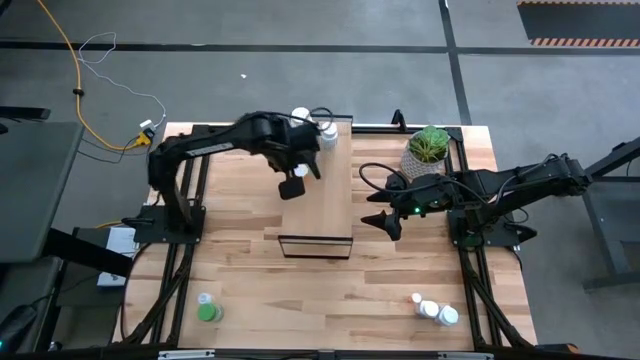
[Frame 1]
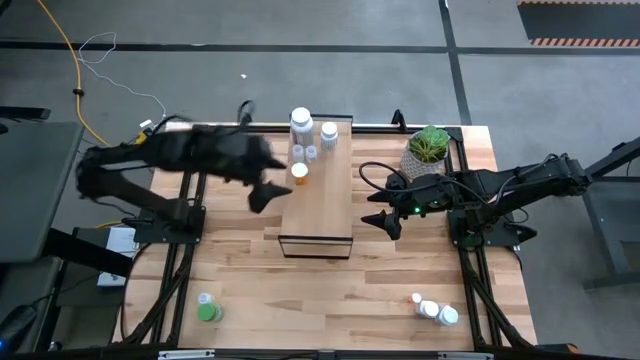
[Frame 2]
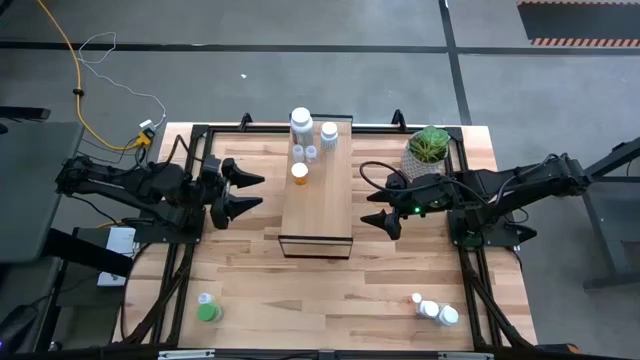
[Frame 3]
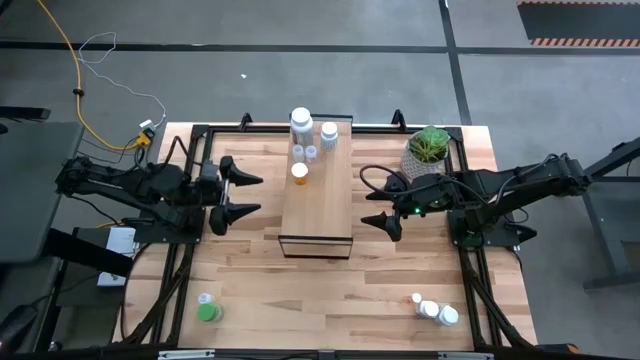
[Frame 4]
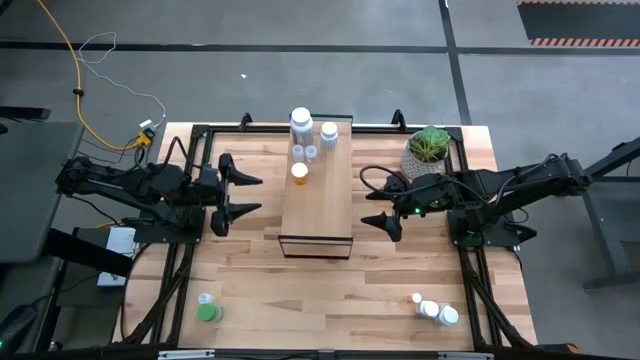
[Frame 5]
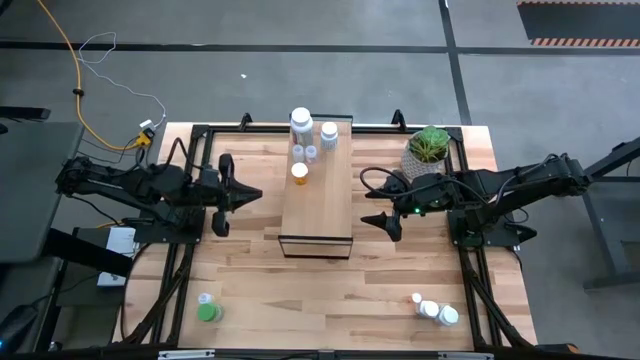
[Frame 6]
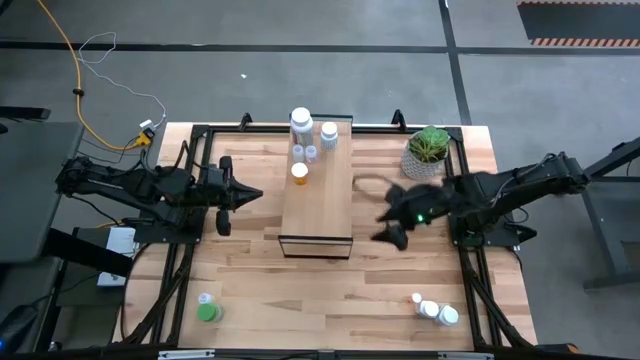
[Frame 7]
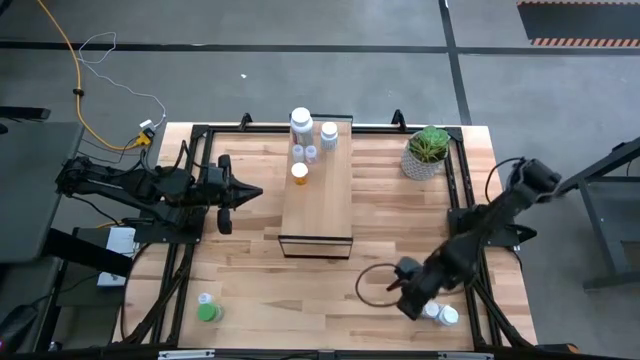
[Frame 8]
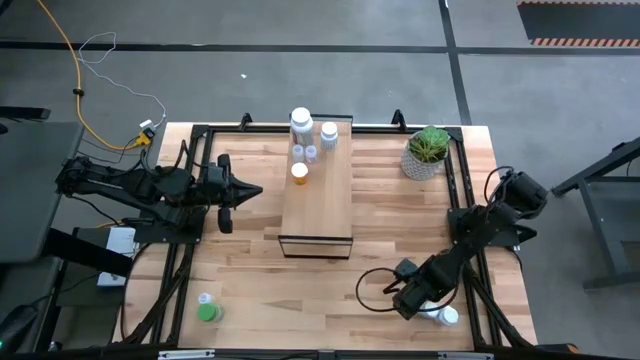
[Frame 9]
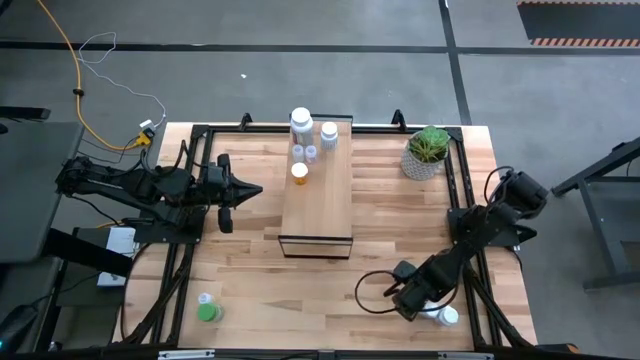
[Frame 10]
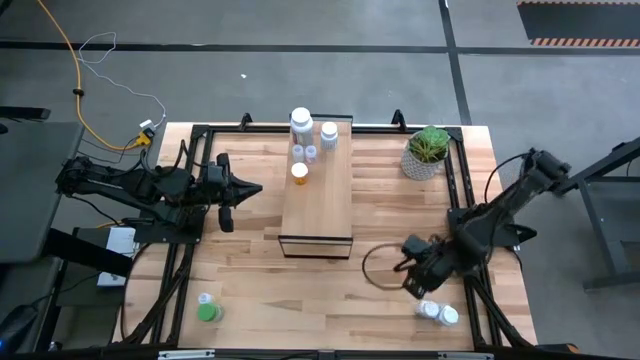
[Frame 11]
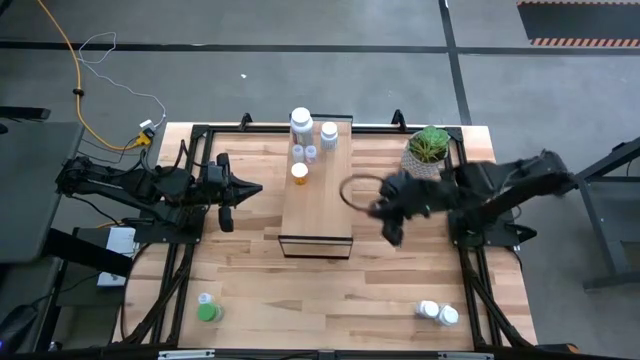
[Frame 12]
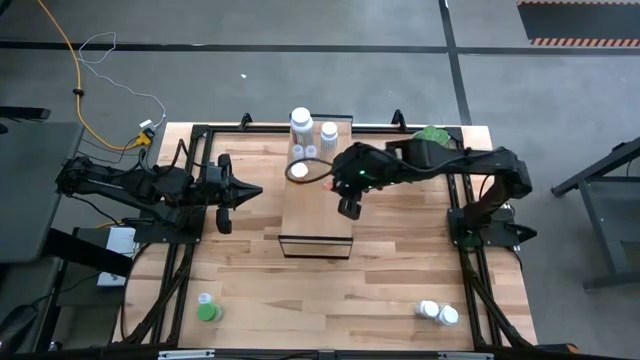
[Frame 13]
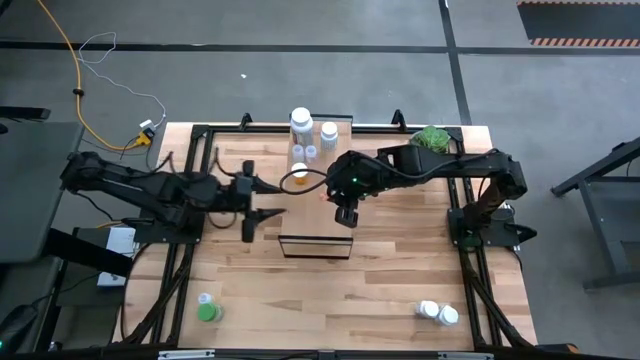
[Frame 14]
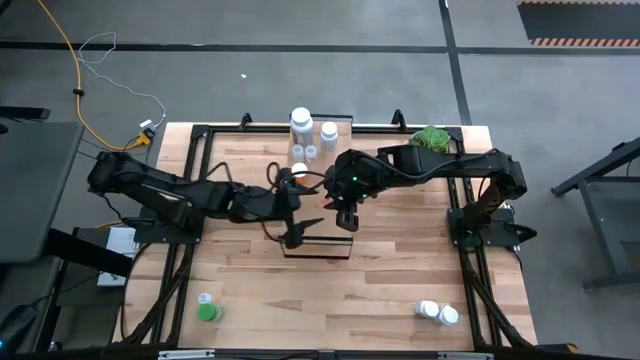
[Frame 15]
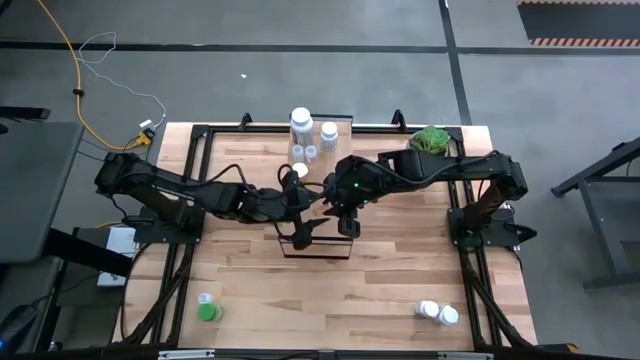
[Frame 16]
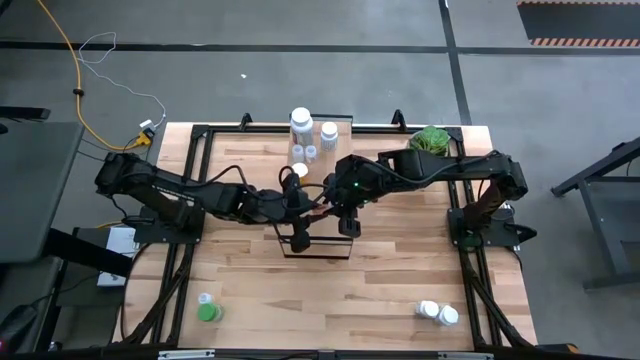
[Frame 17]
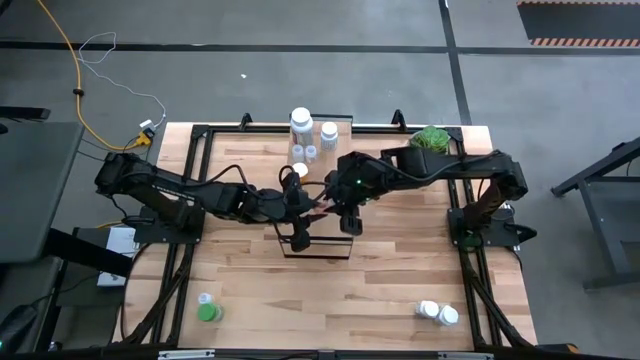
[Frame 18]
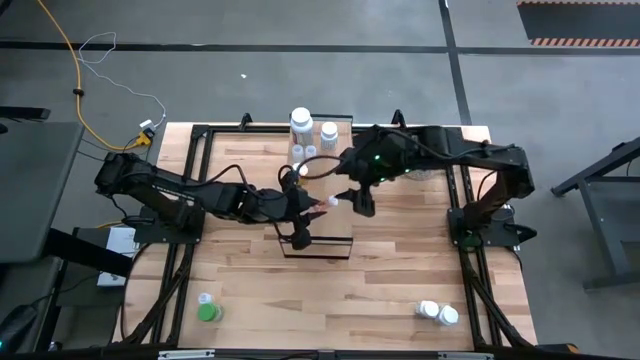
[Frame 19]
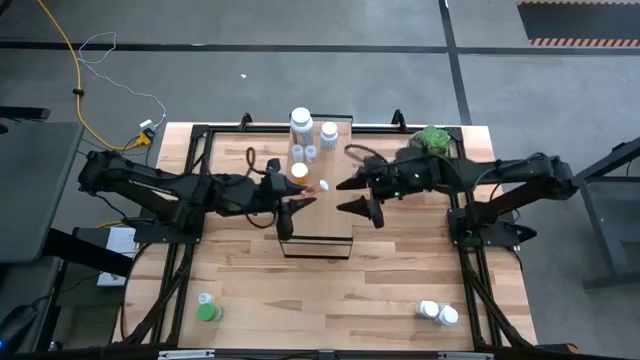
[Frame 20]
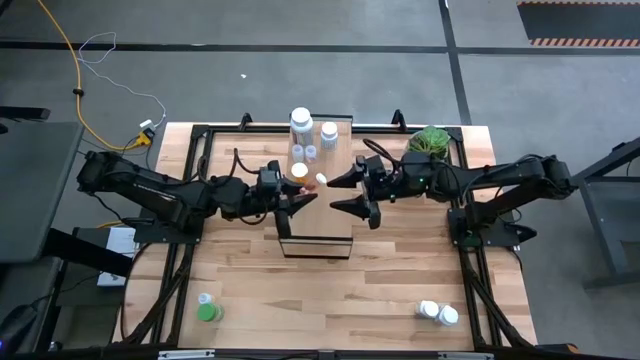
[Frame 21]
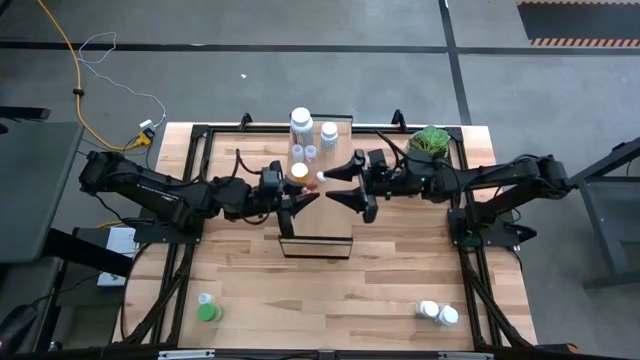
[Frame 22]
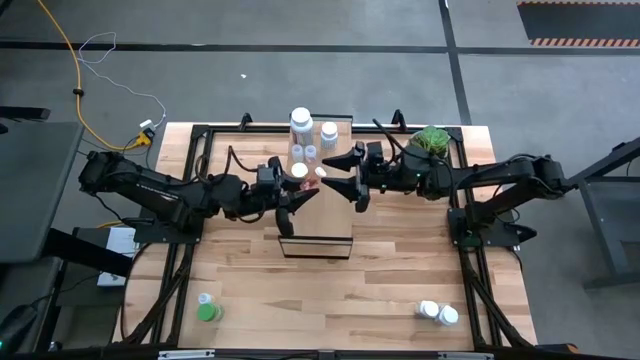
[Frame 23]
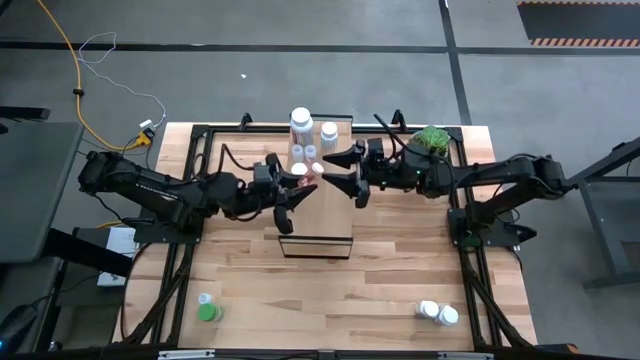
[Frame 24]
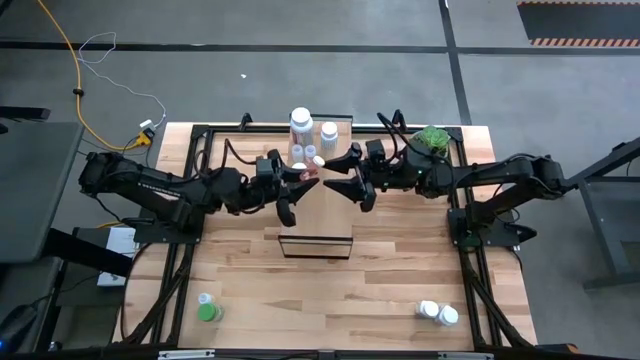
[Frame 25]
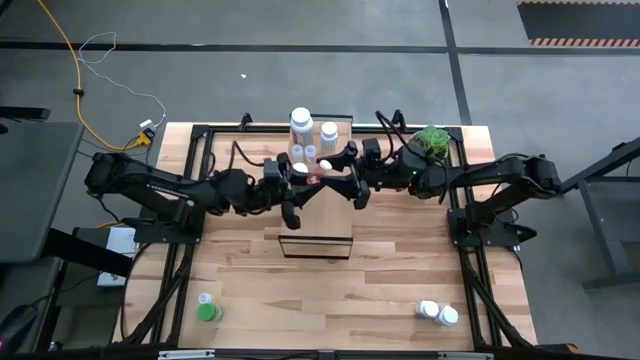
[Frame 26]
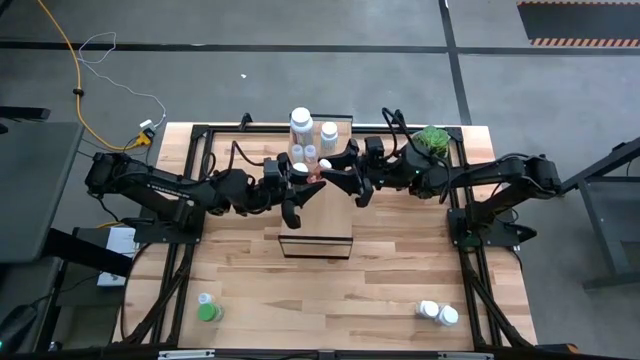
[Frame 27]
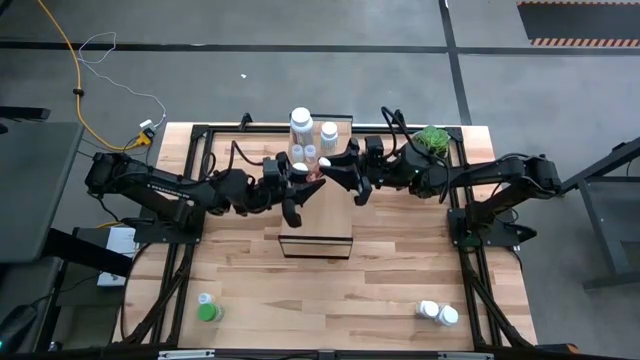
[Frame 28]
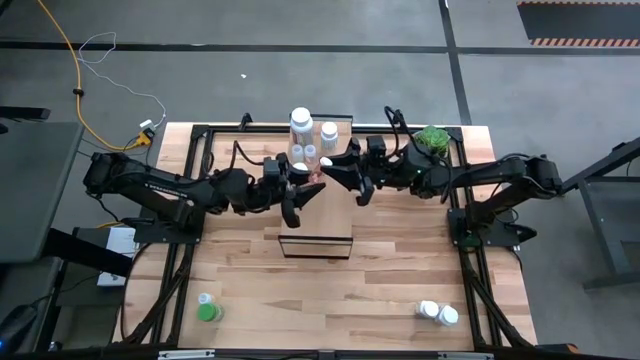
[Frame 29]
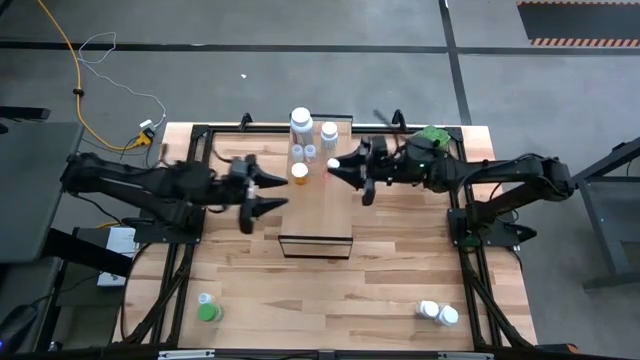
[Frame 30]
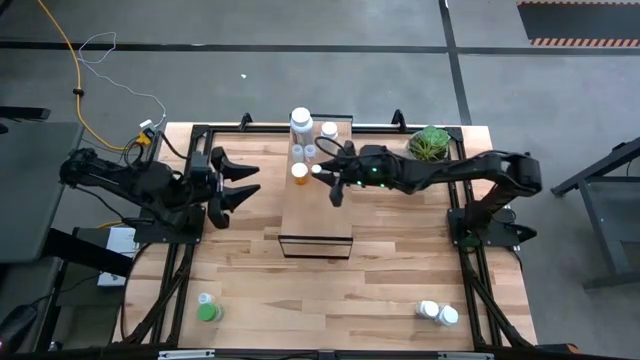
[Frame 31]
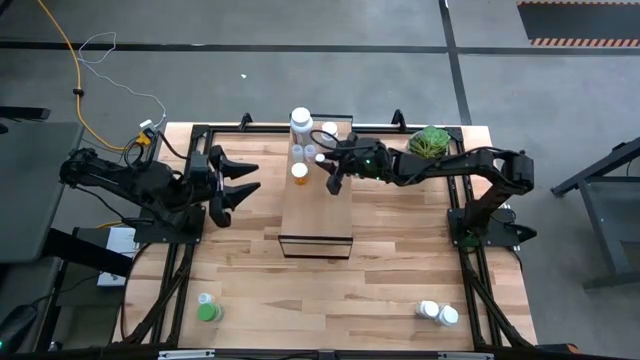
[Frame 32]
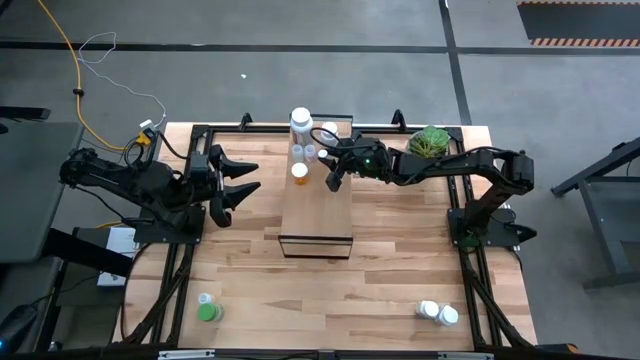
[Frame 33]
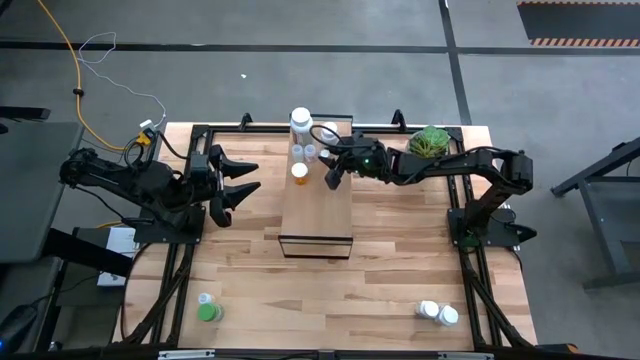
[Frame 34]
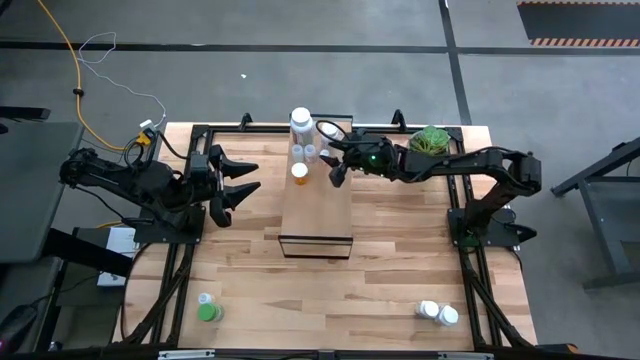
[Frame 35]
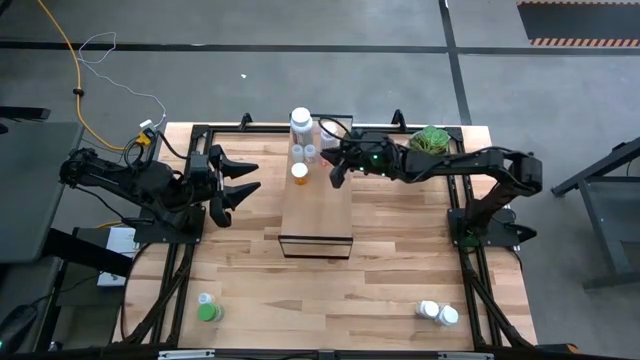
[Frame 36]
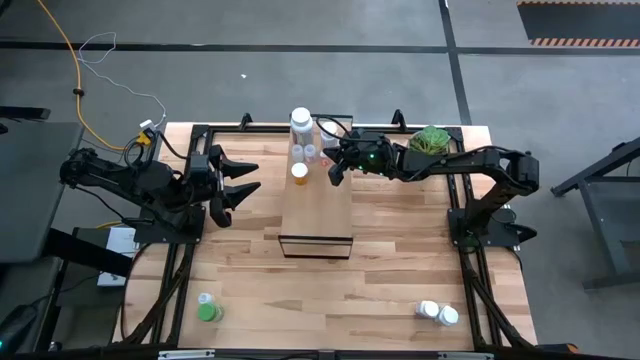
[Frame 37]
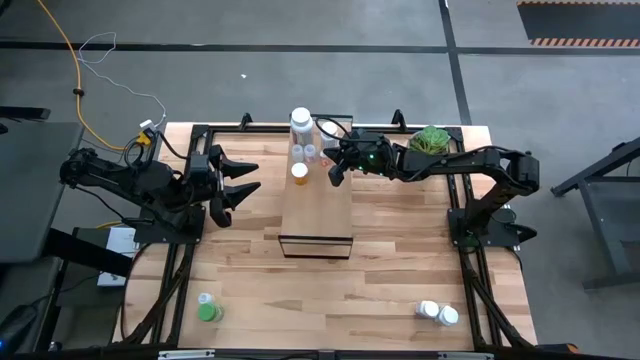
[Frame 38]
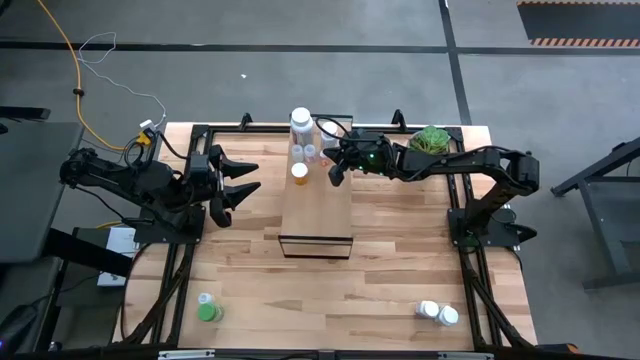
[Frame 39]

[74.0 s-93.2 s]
Task: Pick and place medicine bottles onto shelf by color
Put the pink medicine bottle on the shelf
